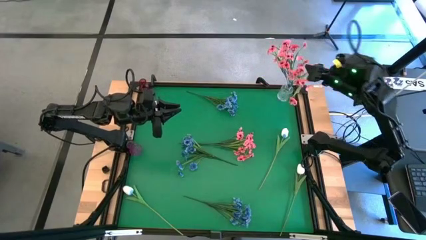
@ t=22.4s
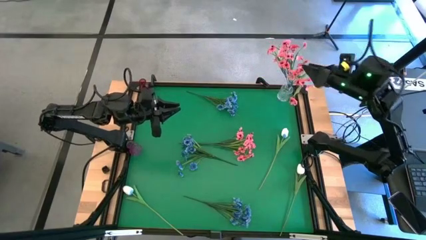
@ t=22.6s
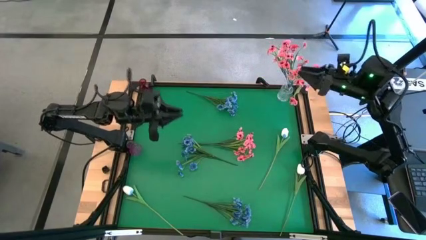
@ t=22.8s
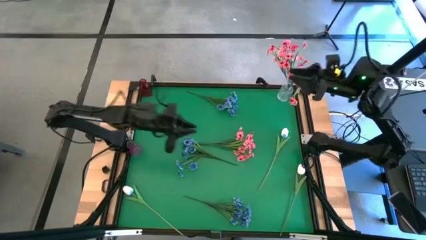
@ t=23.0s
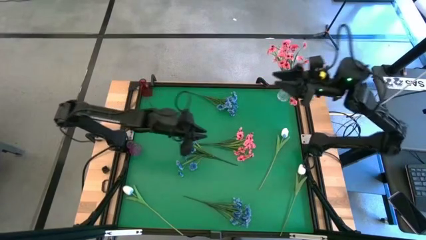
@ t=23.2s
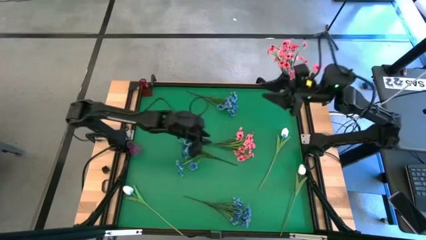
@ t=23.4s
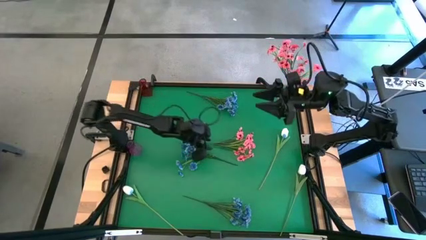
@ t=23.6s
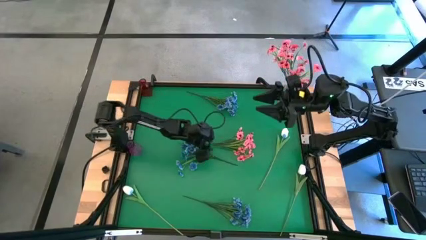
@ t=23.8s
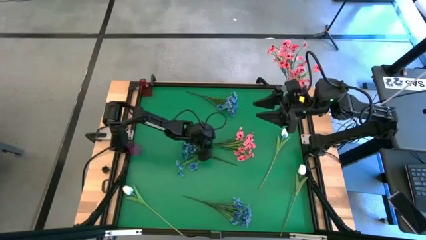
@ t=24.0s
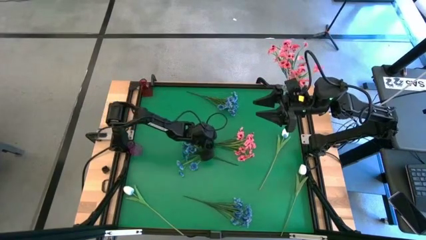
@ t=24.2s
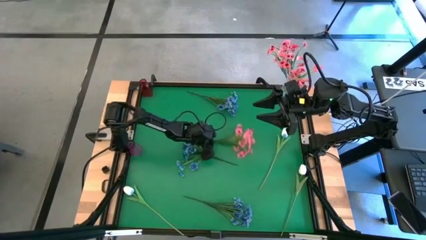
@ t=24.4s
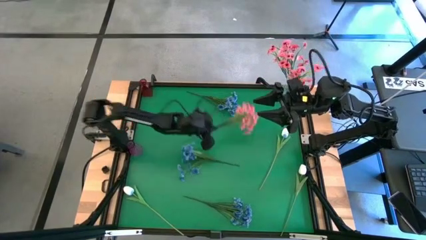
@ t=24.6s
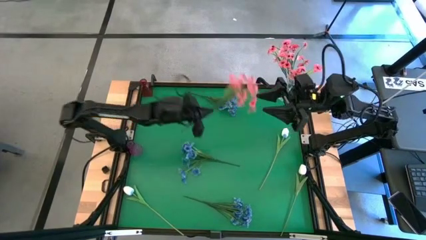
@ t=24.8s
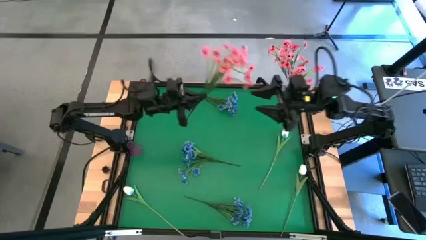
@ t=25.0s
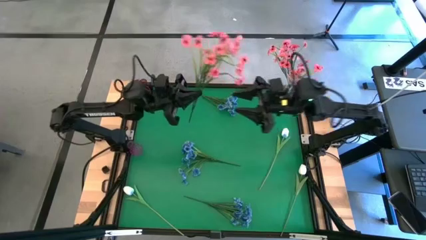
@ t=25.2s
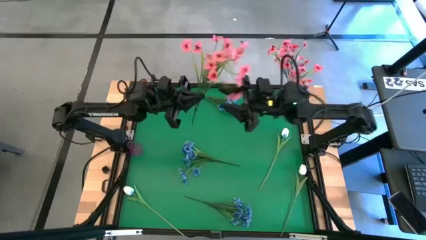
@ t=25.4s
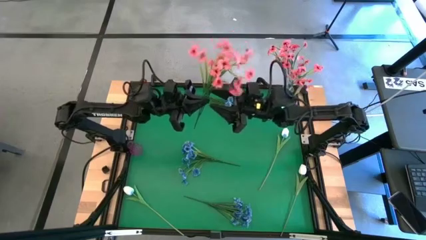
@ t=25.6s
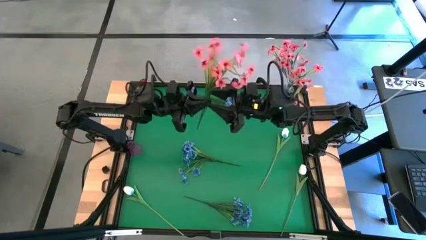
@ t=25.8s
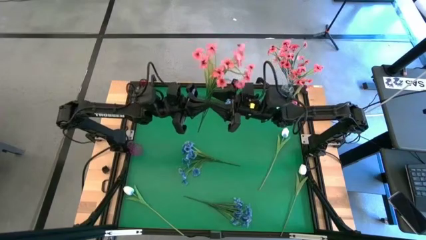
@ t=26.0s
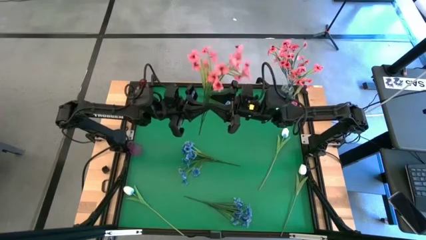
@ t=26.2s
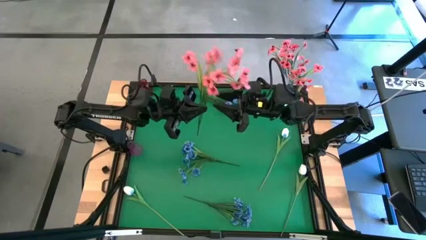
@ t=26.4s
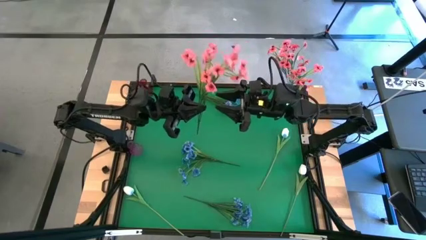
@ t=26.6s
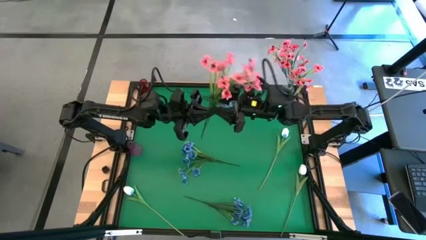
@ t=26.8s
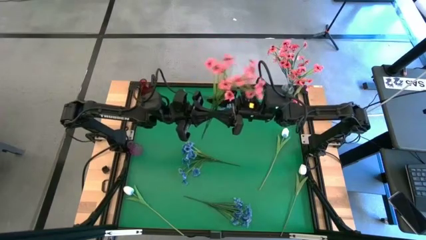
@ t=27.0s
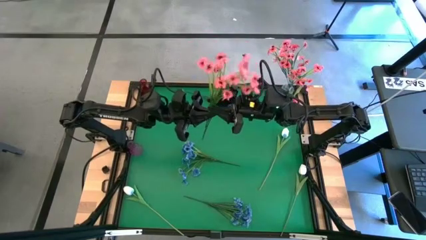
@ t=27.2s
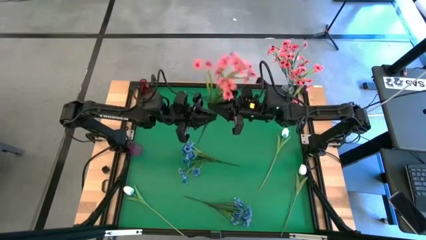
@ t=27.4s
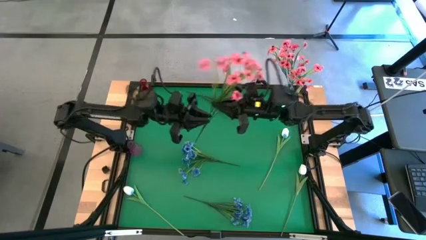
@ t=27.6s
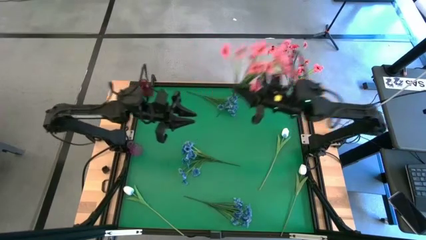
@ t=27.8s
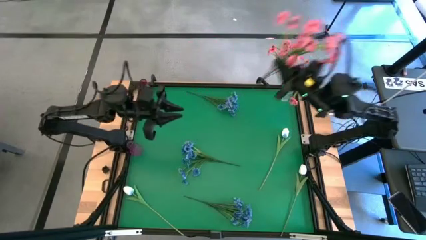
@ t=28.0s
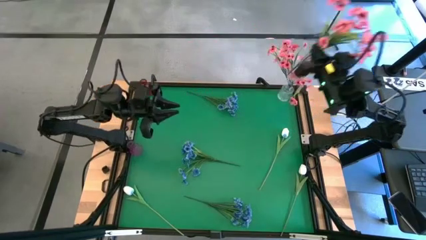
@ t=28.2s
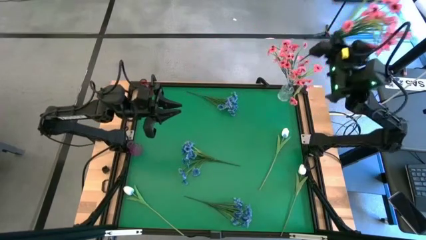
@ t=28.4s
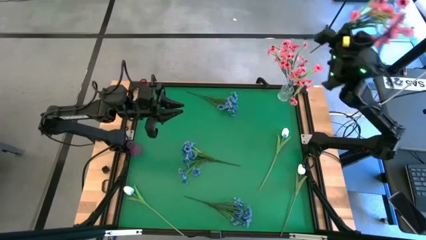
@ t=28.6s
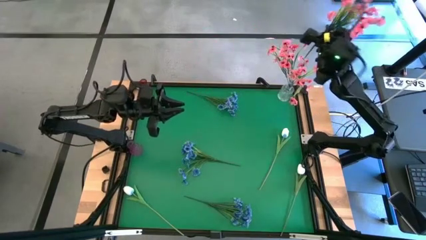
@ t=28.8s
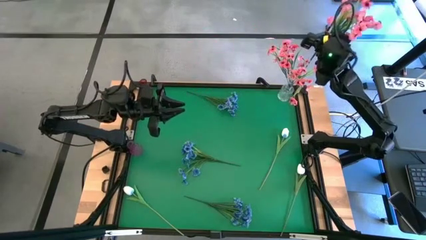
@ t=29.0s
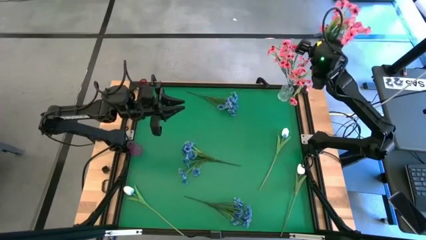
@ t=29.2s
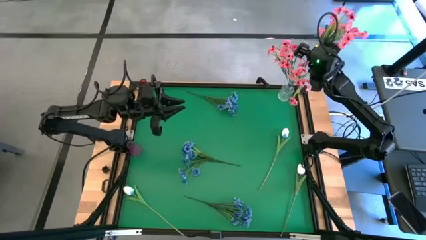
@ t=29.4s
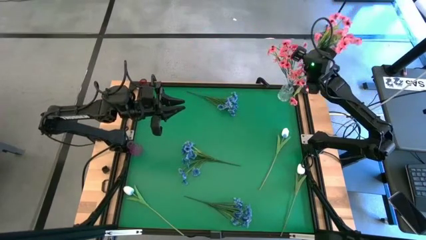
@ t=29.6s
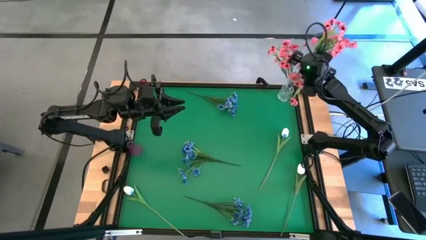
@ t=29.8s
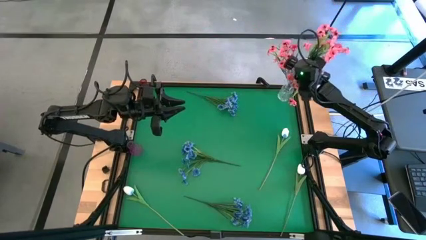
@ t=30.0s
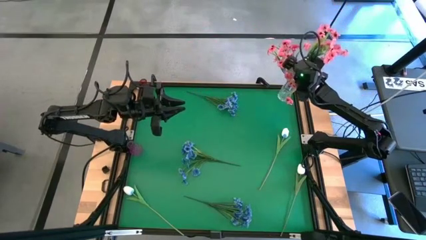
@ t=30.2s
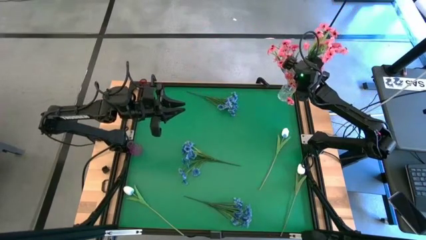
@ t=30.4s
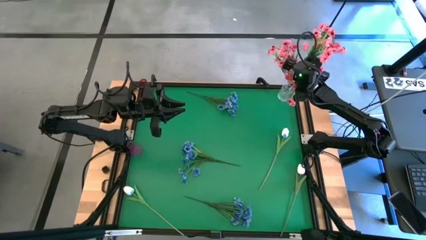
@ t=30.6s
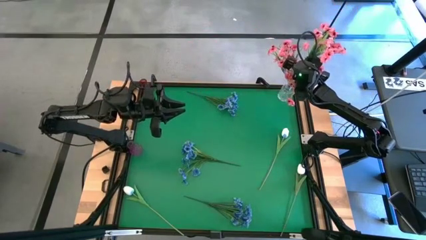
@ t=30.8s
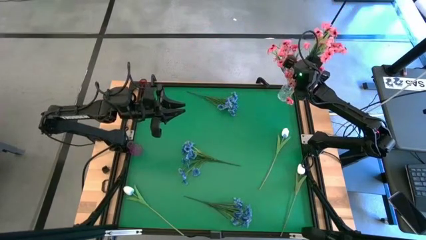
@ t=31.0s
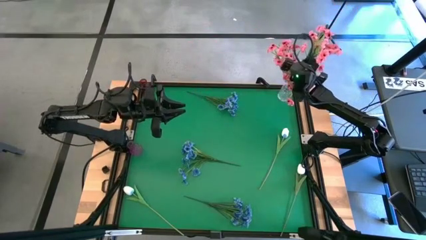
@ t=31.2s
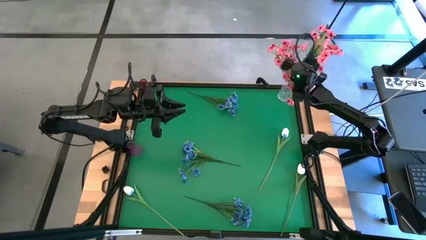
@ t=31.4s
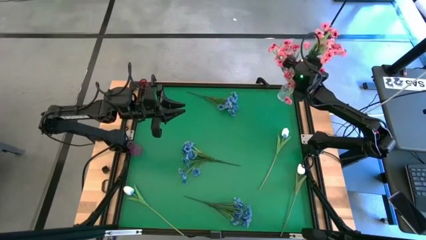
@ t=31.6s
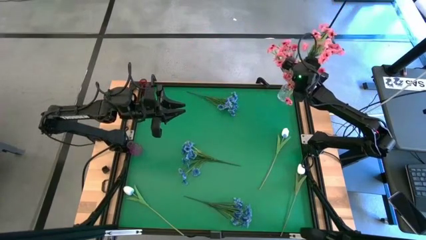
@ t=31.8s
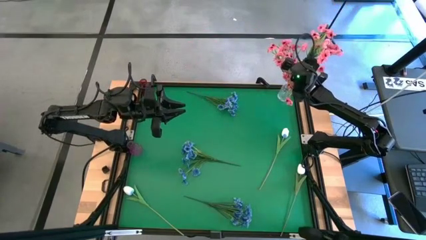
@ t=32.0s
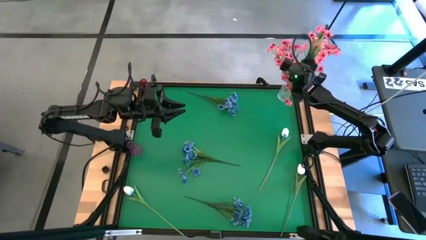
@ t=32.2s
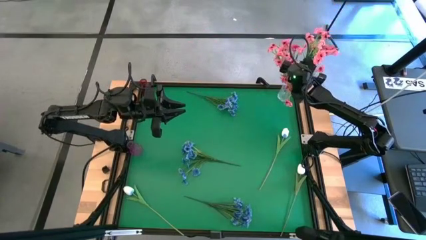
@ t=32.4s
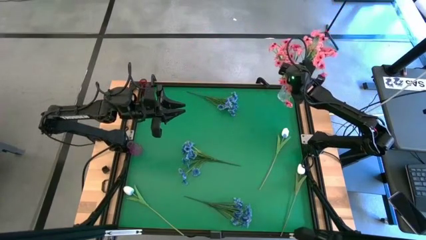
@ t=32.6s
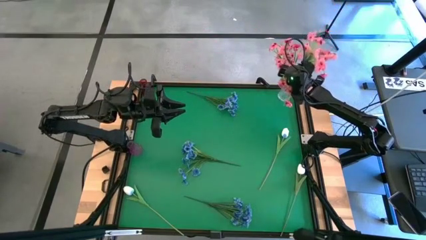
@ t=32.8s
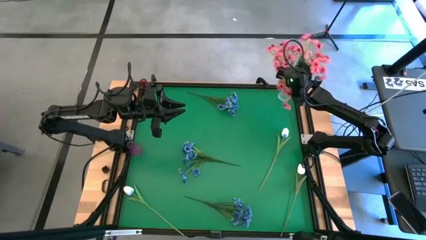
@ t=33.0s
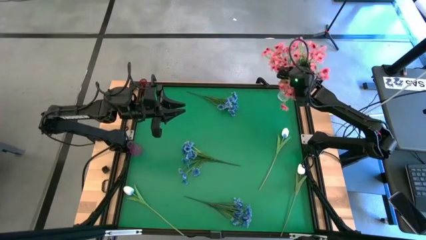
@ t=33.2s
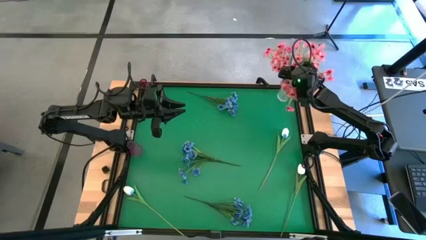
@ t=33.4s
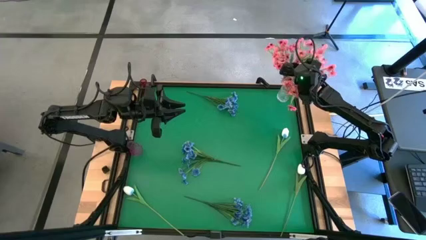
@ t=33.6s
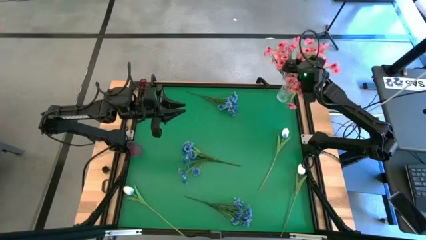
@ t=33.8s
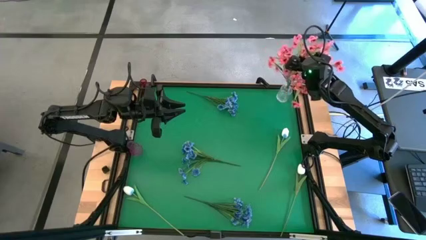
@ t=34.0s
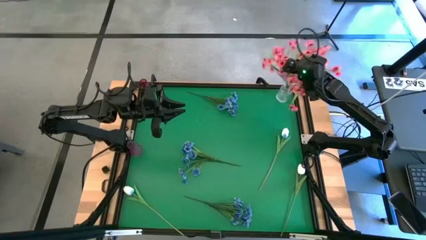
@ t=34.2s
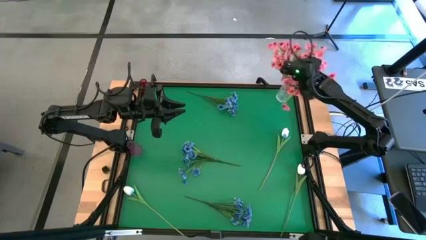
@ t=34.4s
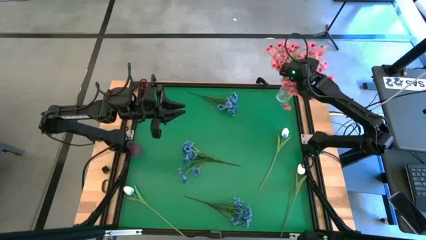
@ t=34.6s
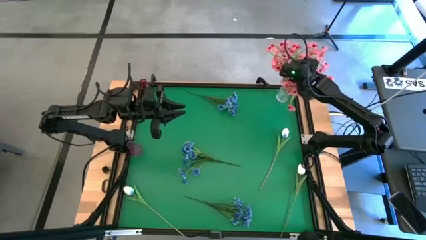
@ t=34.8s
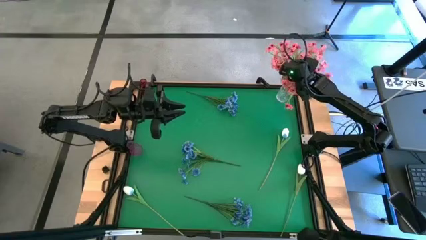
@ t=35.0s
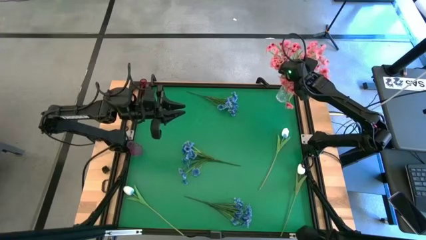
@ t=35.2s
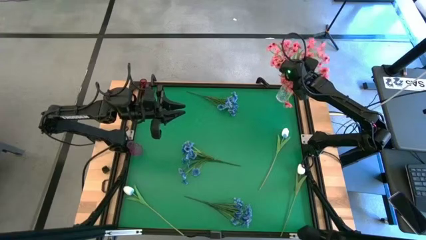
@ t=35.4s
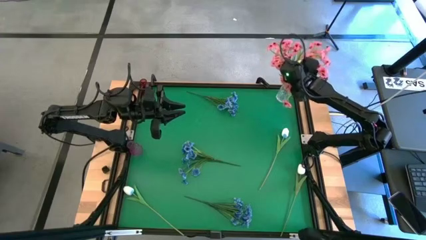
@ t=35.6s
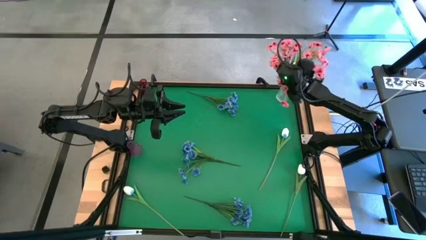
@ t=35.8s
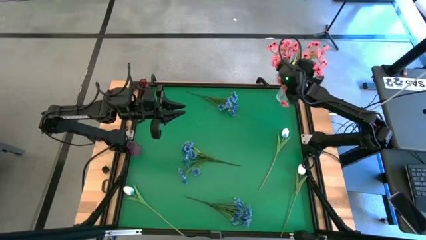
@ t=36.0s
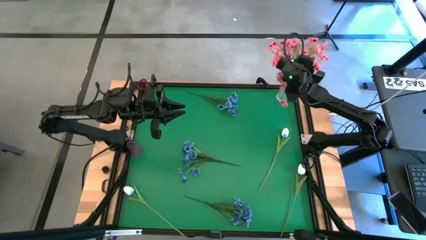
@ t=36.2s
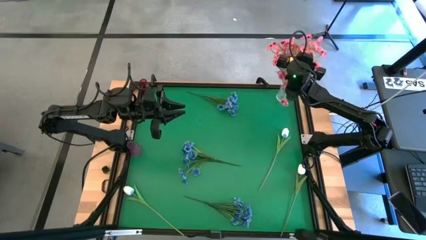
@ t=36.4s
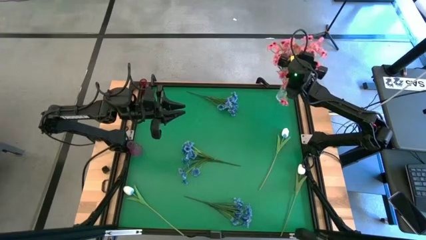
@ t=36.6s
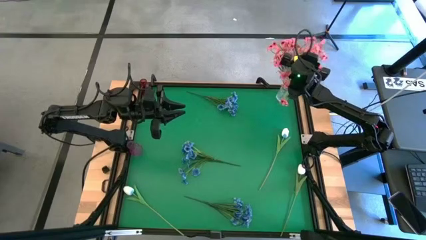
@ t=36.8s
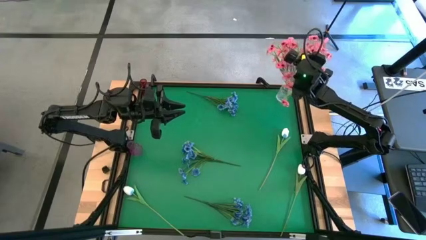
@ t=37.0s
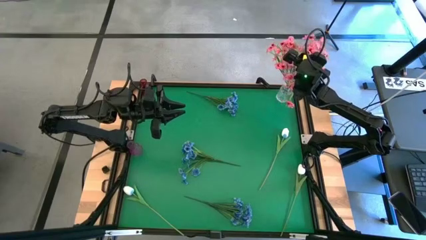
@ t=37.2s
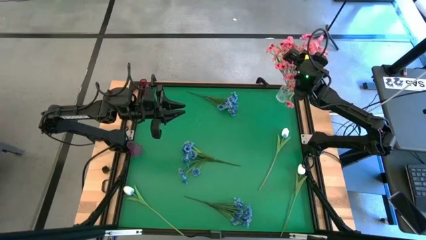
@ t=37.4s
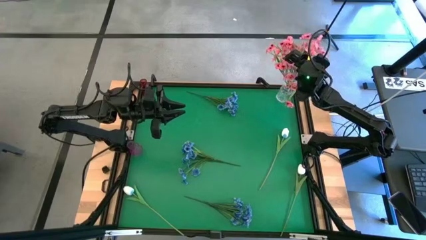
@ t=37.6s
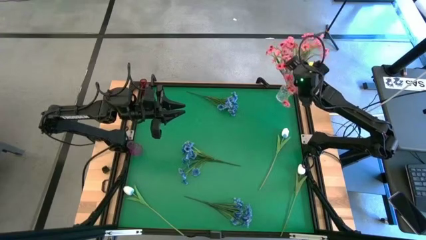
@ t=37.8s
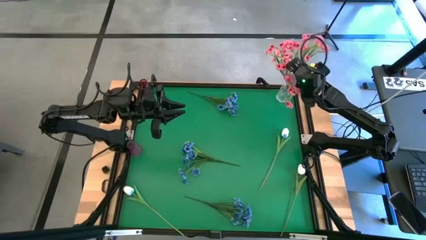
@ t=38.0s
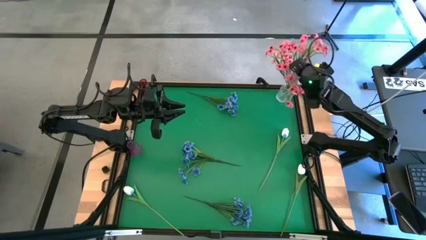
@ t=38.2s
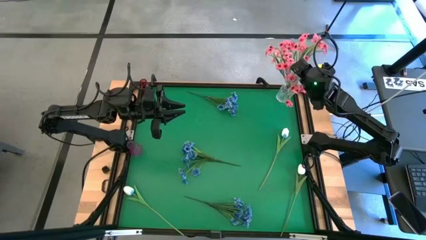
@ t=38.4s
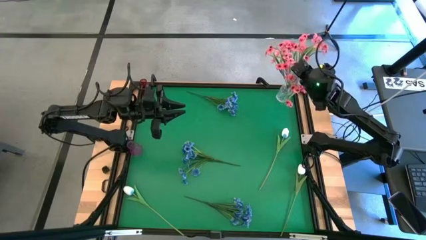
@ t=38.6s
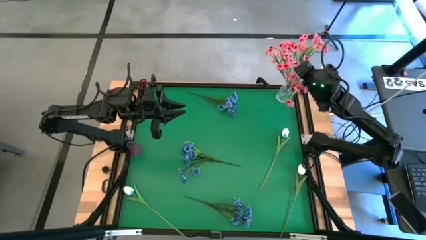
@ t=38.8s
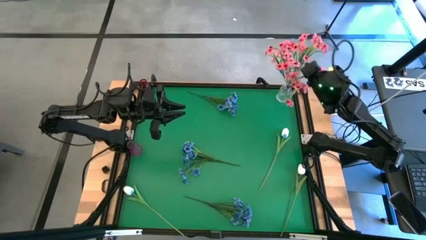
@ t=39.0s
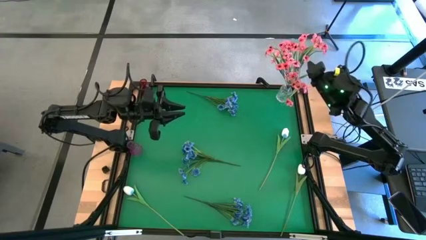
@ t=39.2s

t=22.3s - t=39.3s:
Task: Sort flowers into vase by color
Put the pink flowers into the transparent vase
